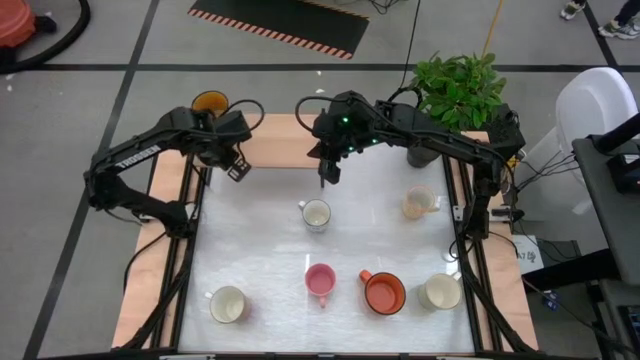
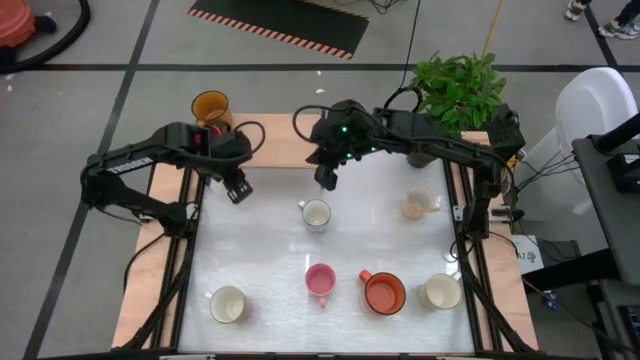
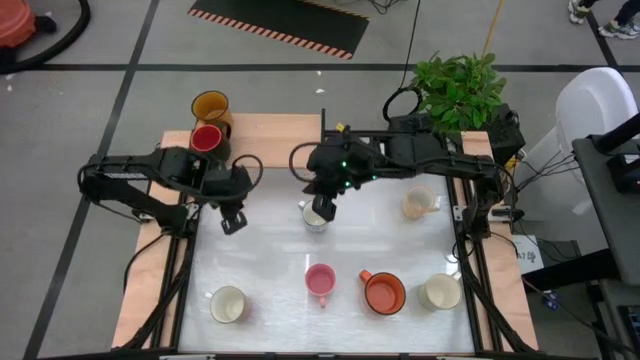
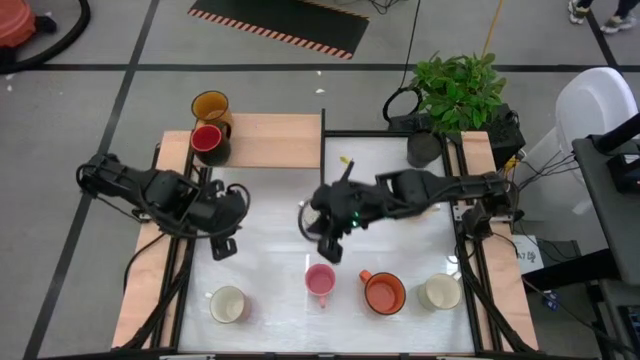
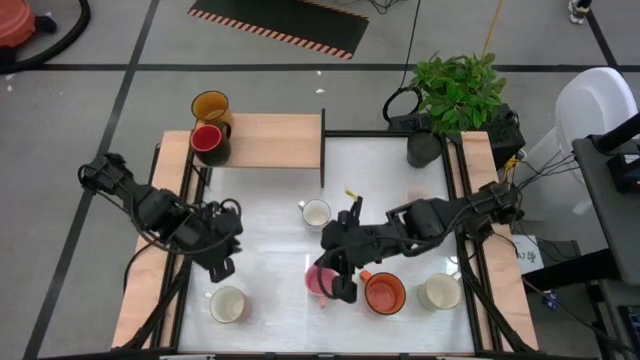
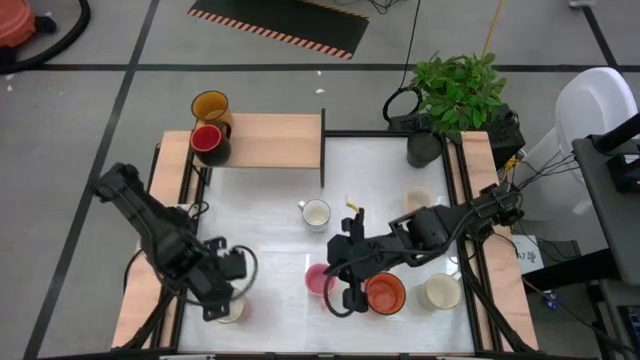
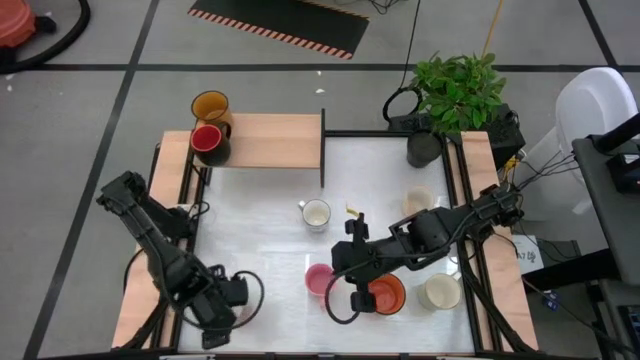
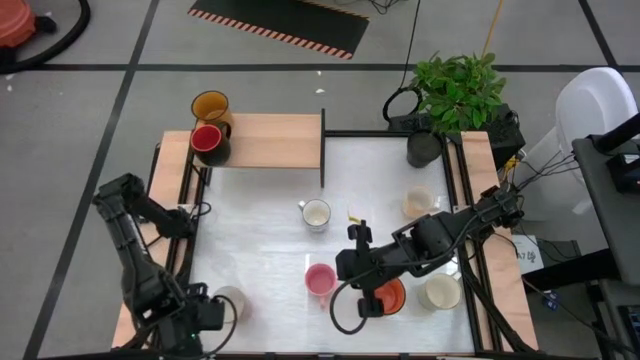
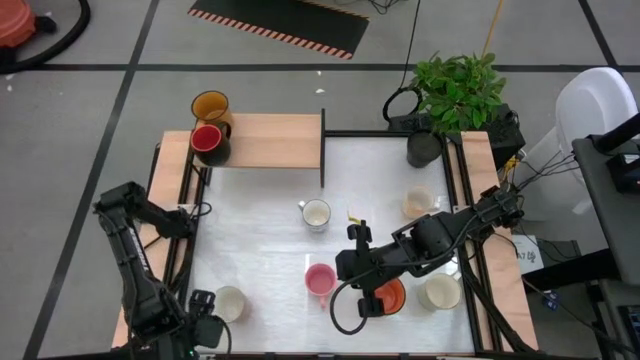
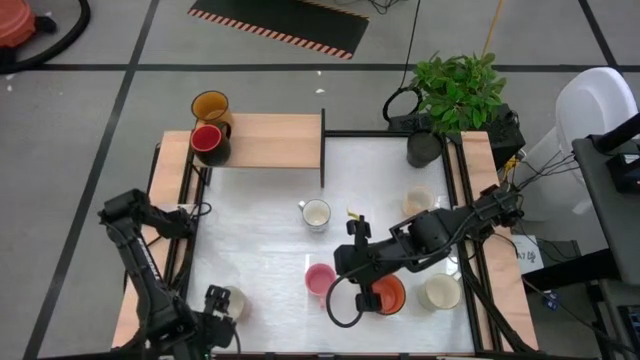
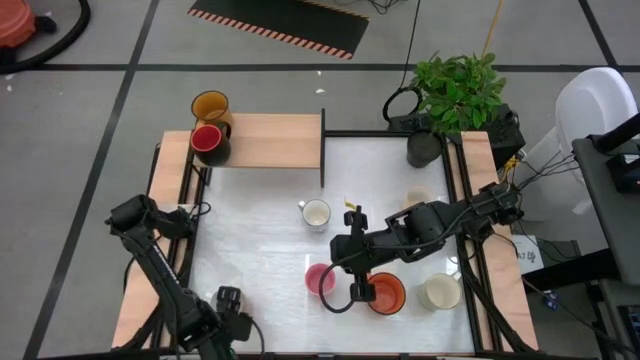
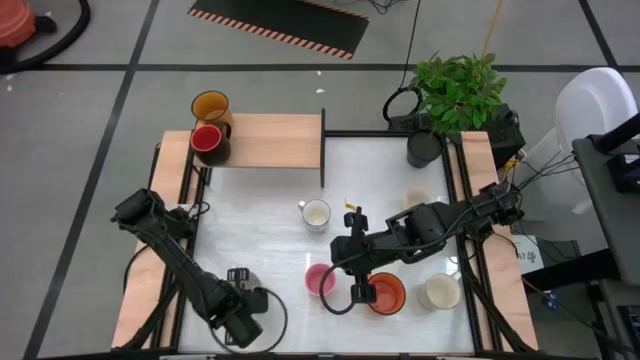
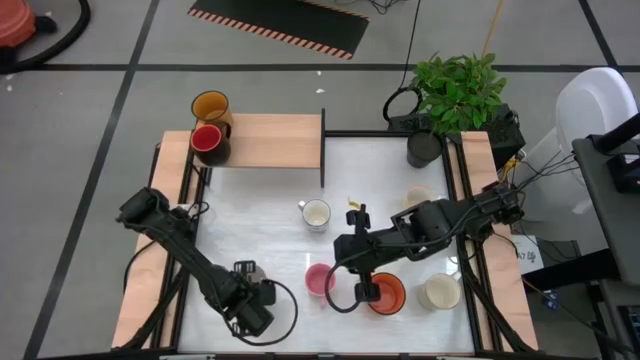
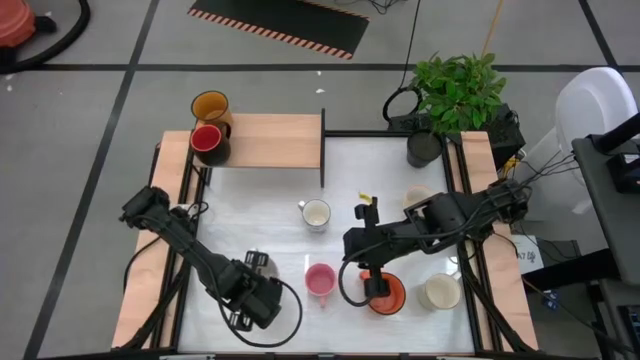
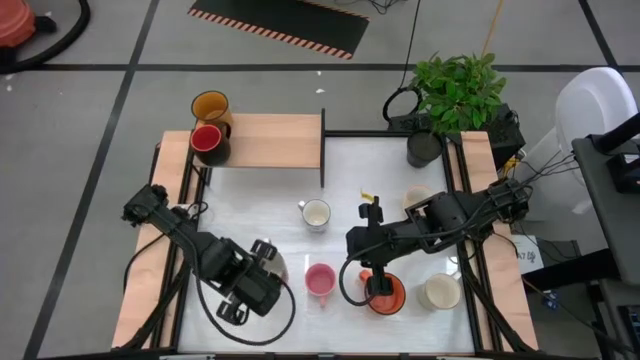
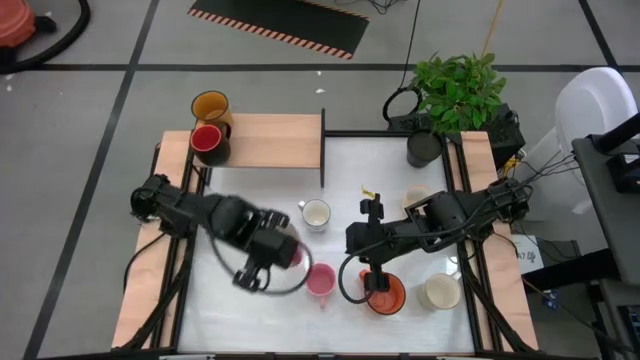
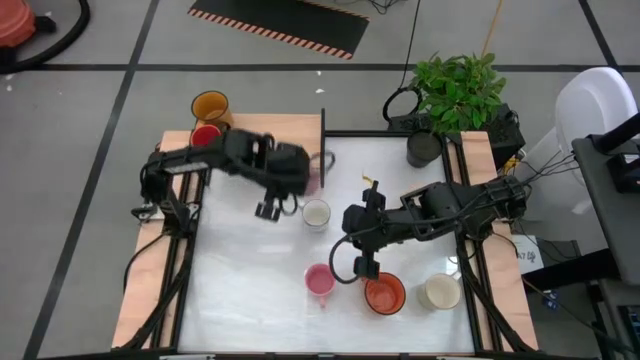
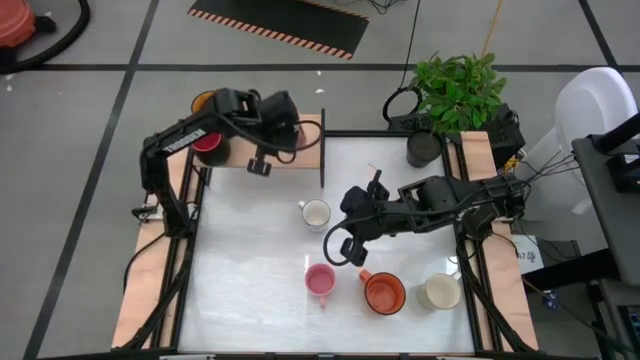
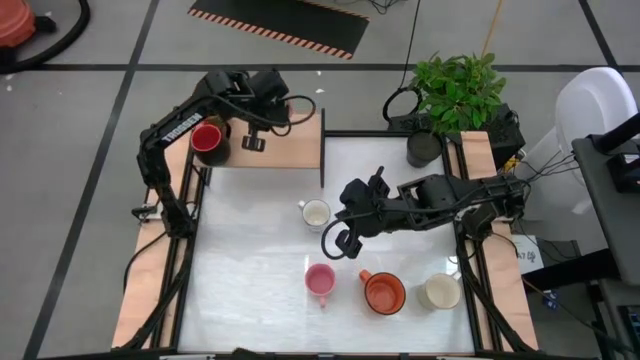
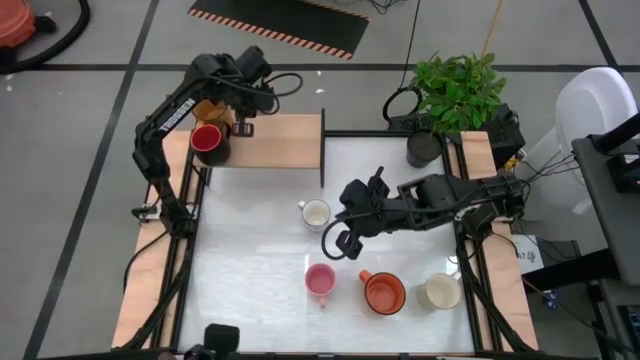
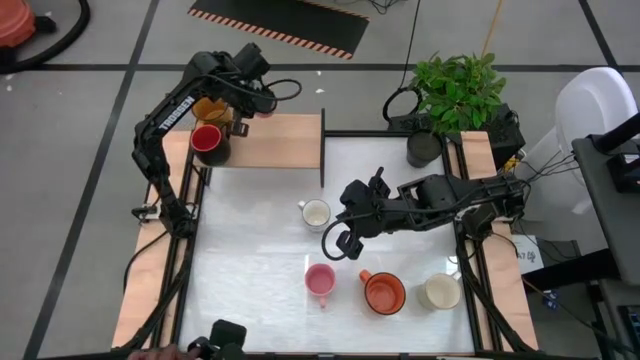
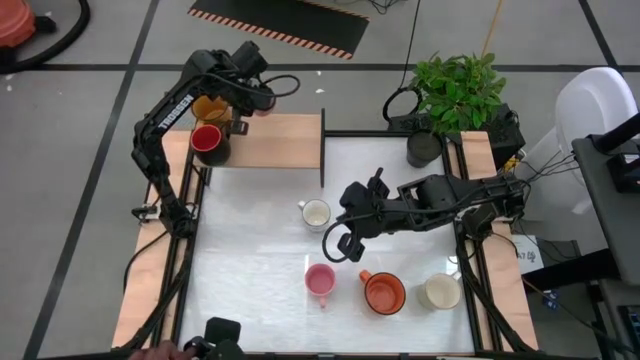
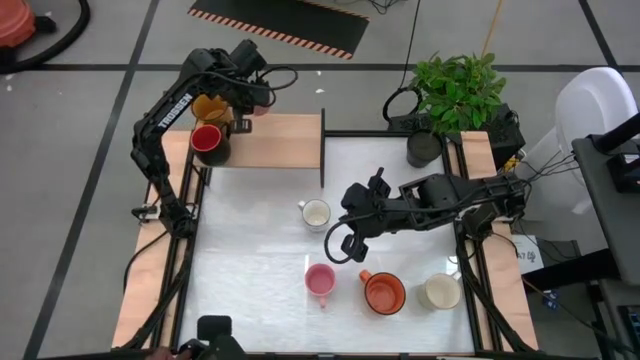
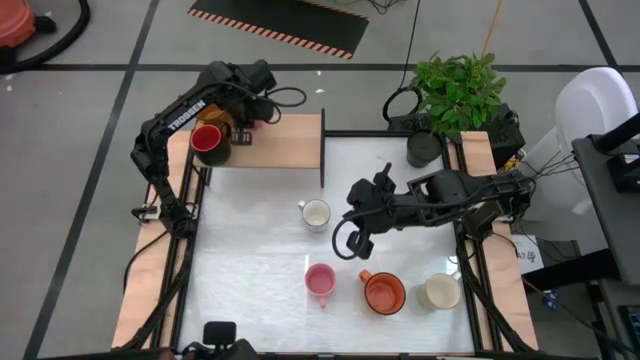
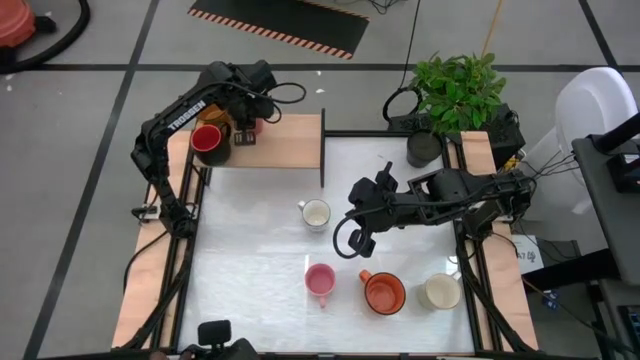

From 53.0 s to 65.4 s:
Task: Place coffee mugs
Put the left orange mug on the shelf

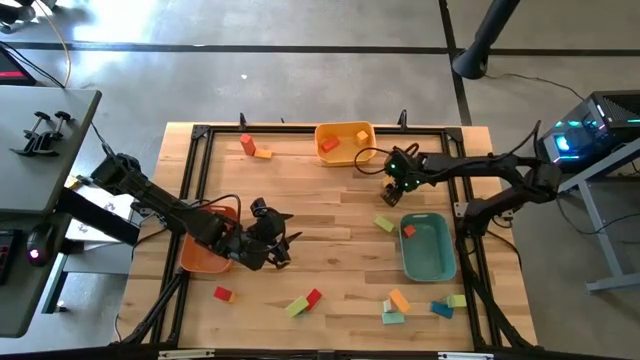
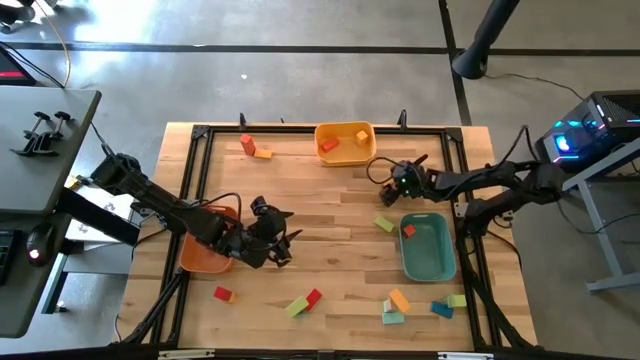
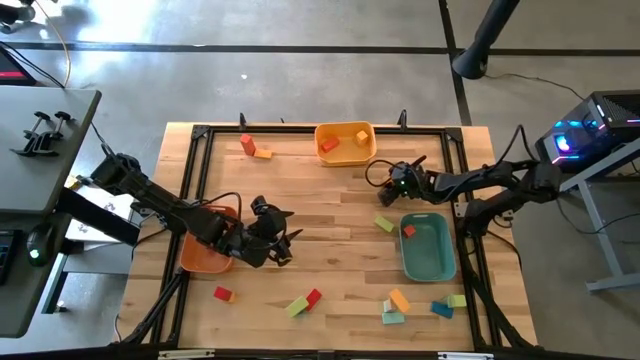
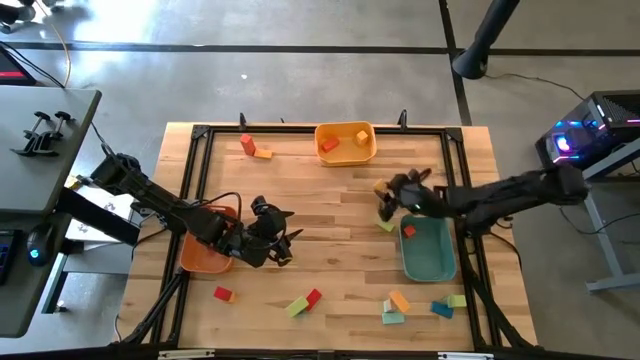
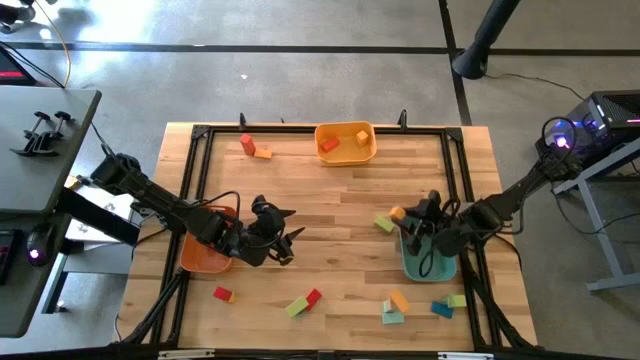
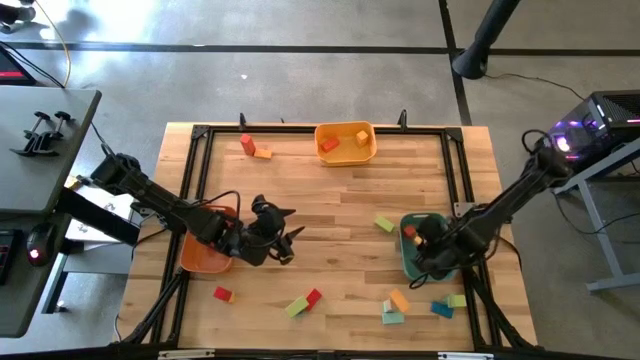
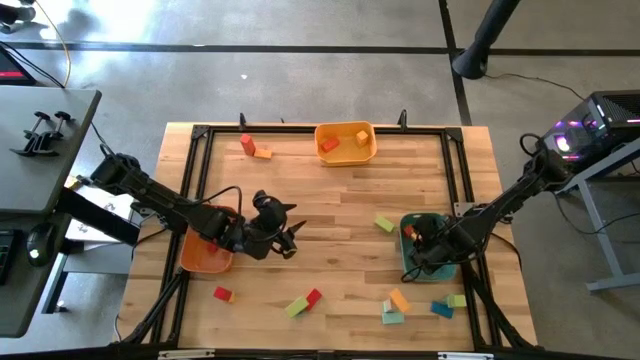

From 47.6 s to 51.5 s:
Task: Sort blocks by size
Put the yellow small block into the right bin
